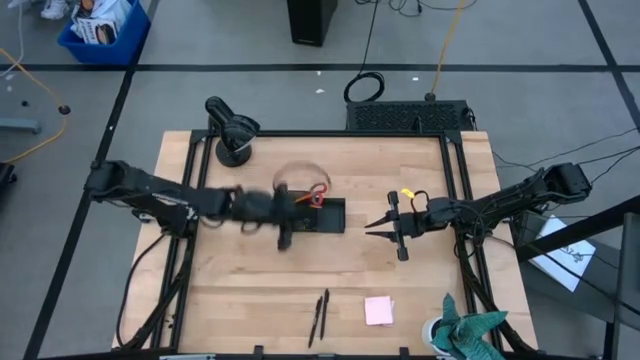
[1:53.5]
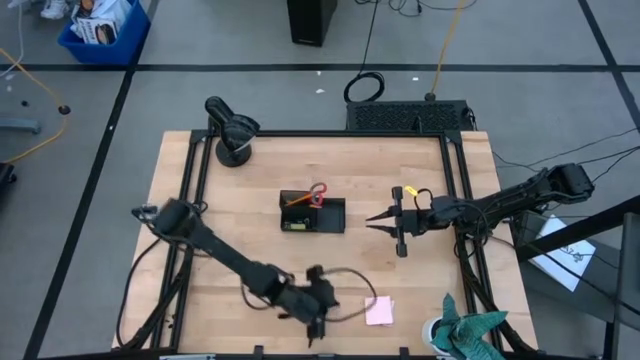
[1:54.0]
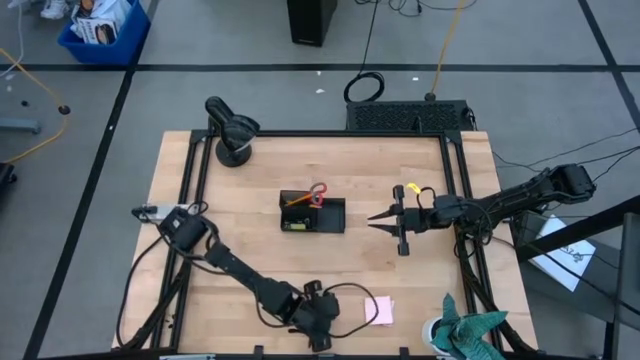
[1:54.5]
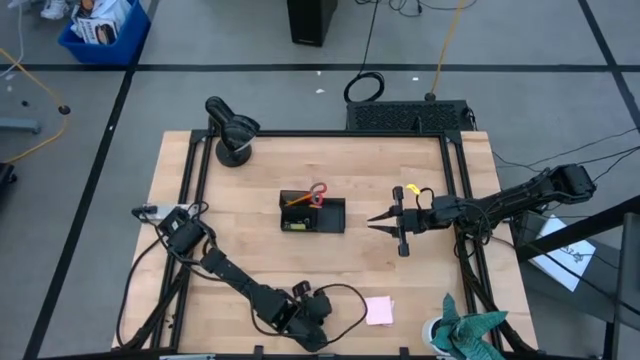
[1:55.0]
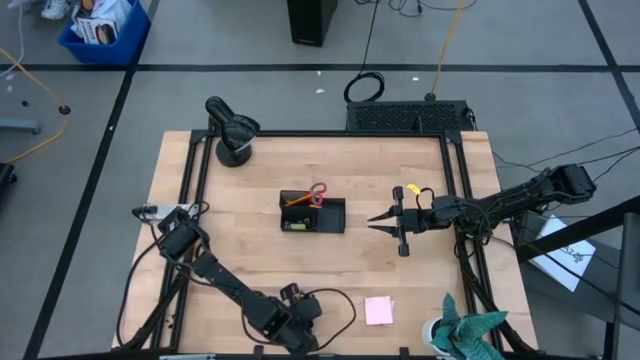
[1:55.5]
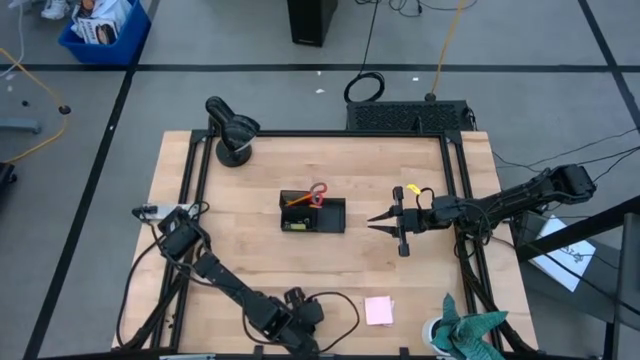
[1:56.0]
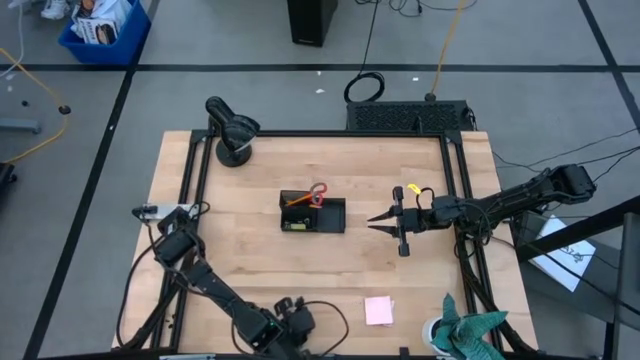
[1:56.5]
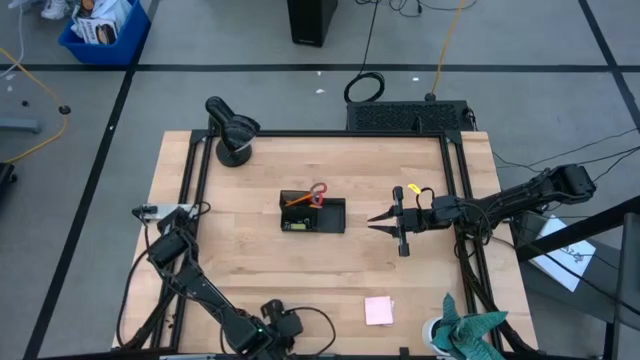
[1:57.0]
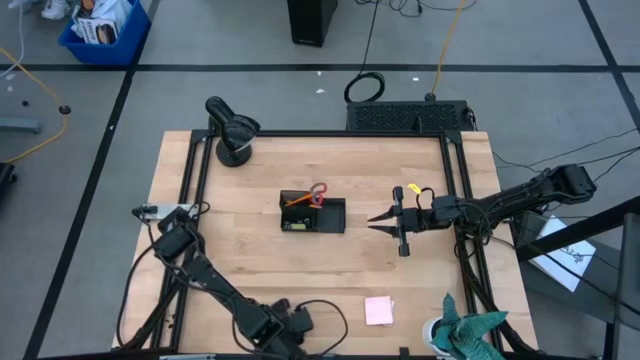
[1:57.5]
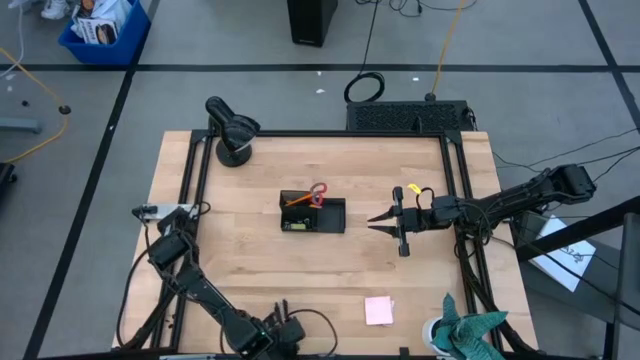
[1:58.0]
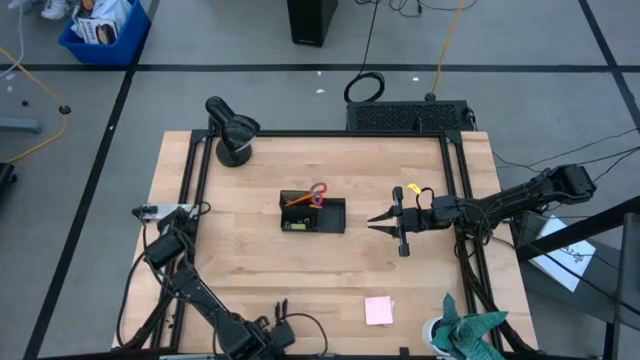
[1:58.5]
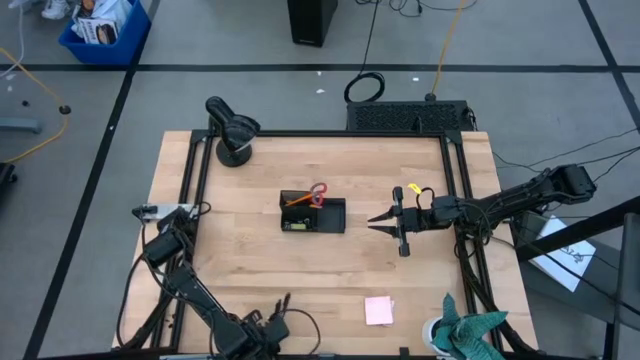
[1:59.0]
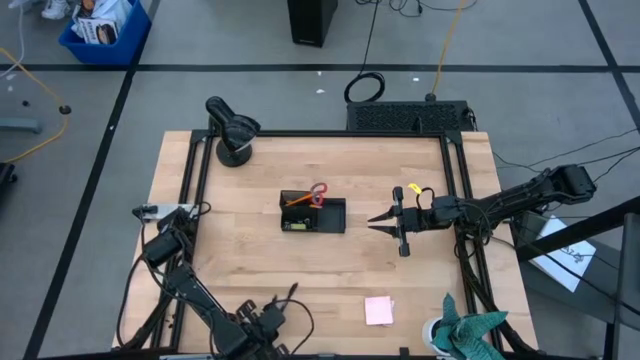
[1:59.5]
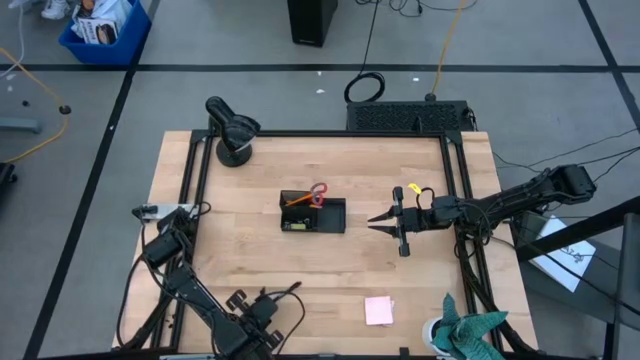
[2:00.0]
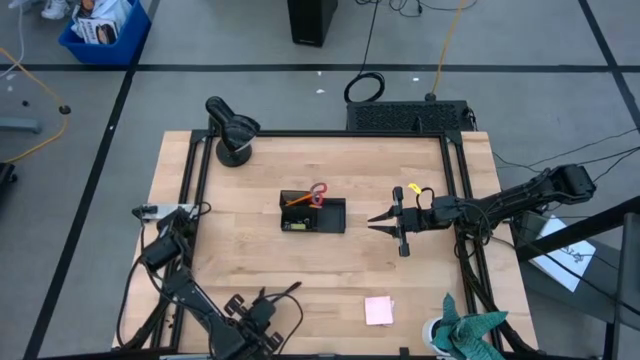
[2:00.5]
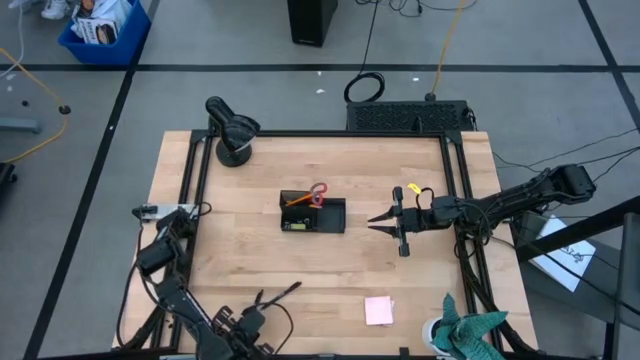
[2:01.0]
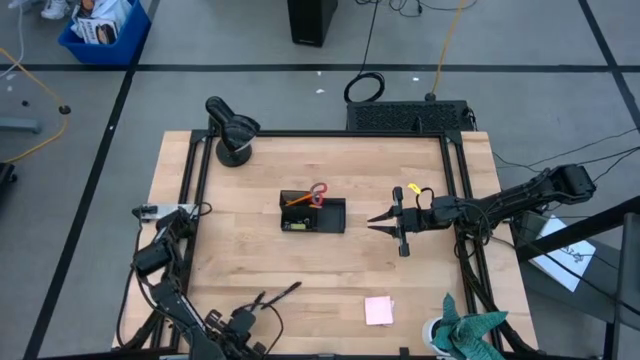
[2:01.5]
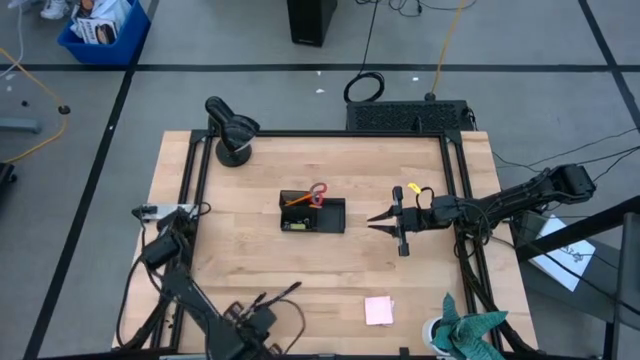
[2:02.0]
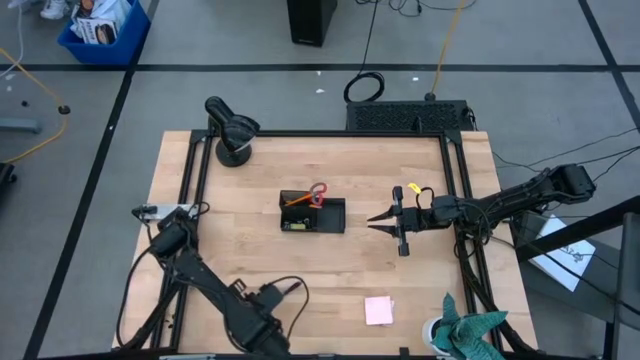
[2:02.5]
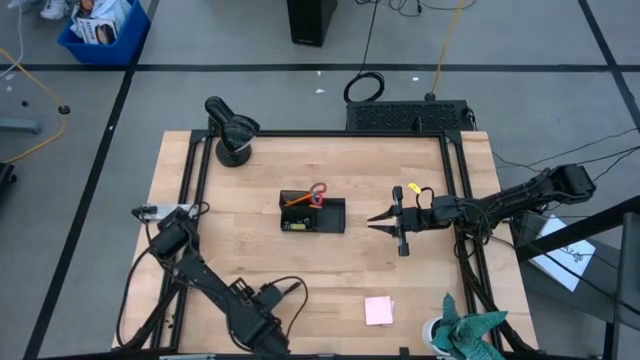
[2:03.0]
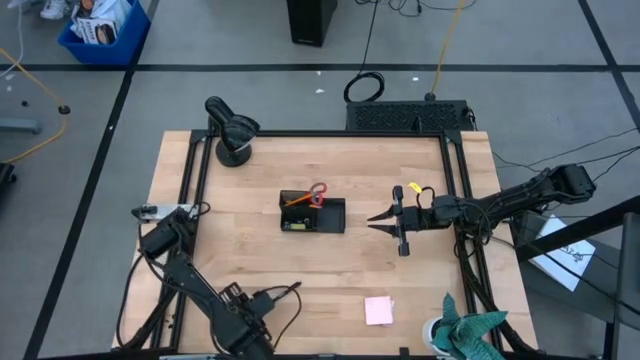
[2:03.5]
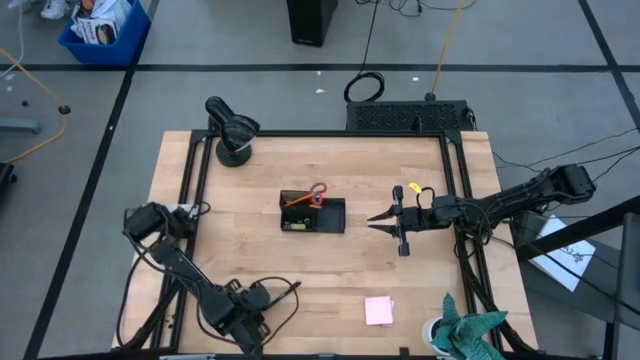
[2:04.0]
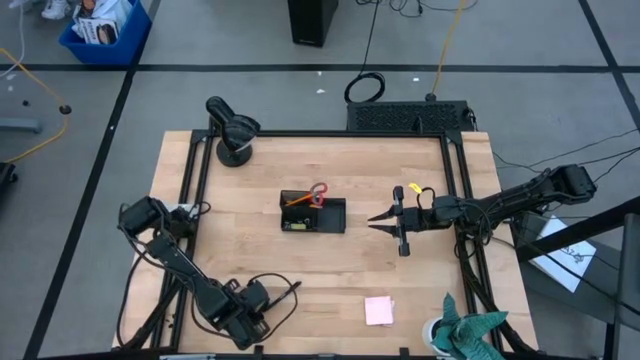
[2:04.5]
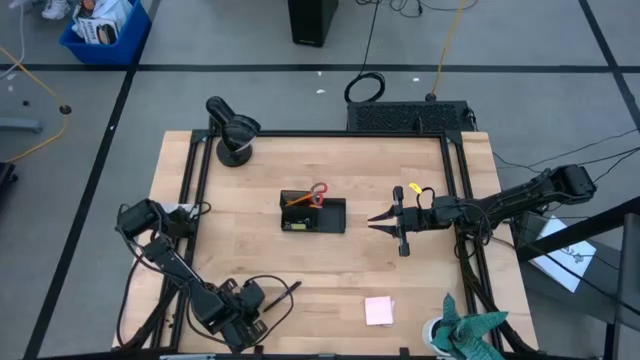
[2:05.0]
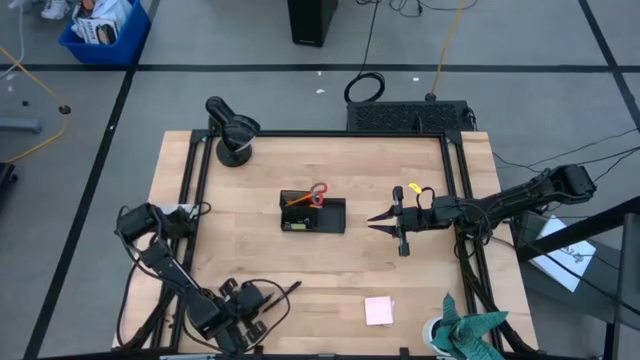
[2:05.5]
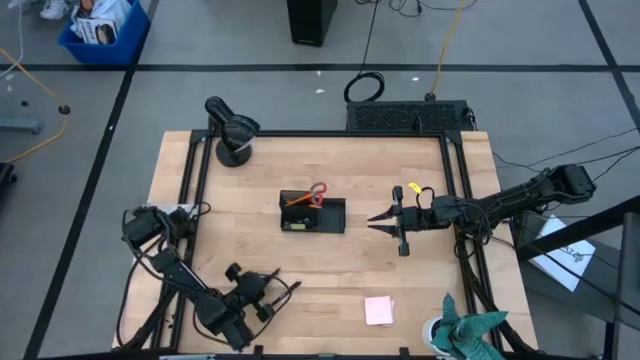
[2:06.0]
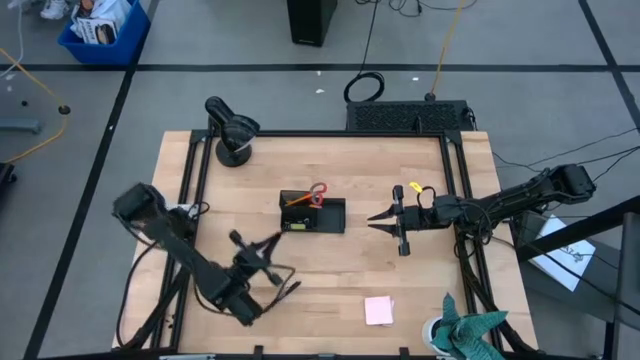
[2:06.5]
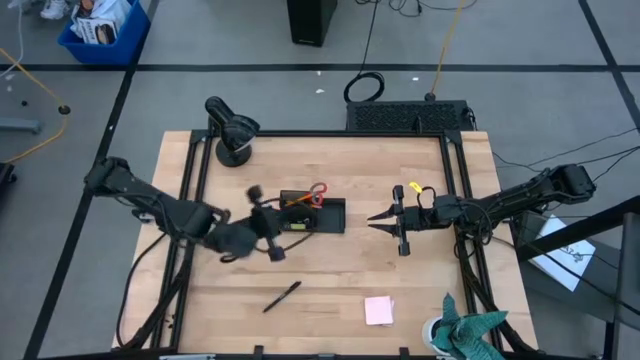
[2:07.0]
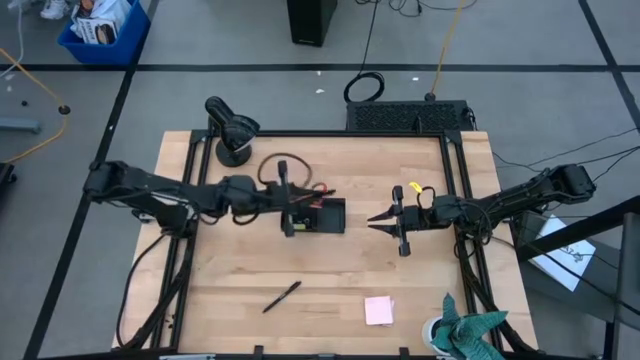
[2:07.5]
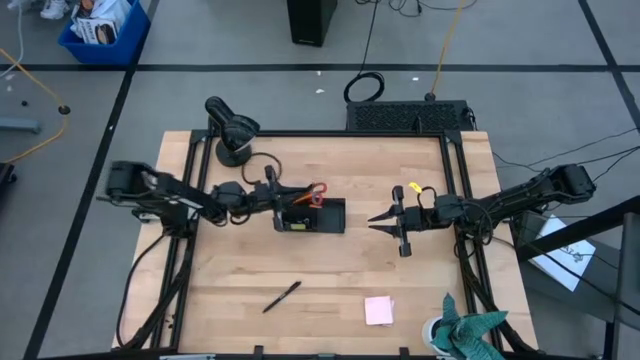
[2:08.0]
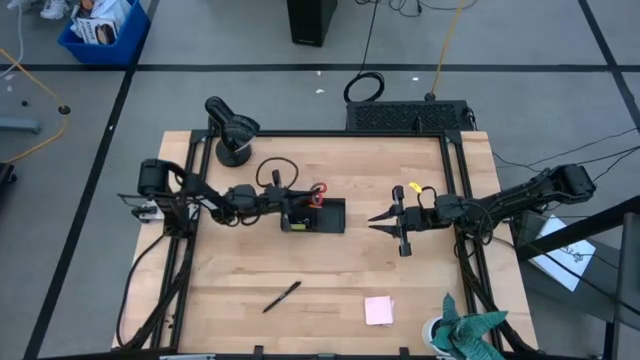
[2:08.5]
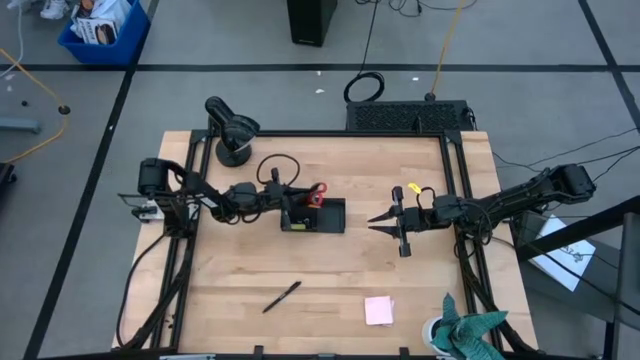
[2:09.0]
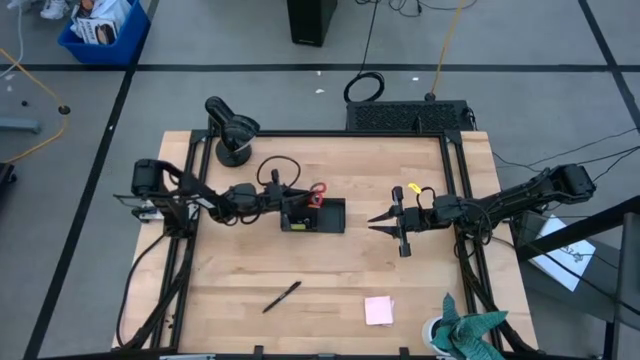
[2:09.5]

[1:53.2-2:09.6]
Task: Pick and place office supplies into organizer
Put the black pen into the black desk organizer
